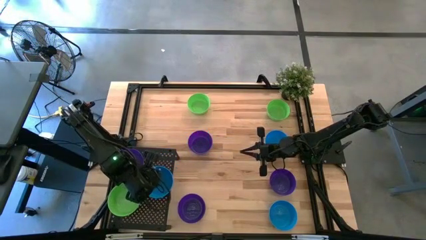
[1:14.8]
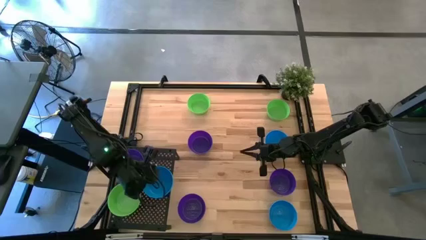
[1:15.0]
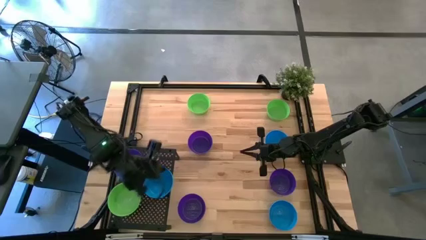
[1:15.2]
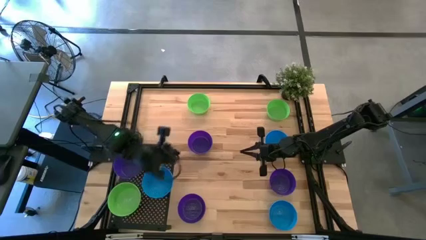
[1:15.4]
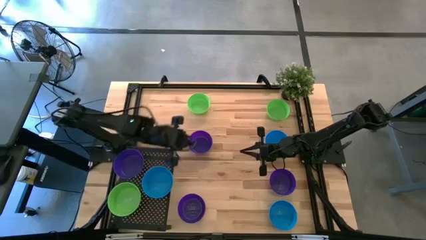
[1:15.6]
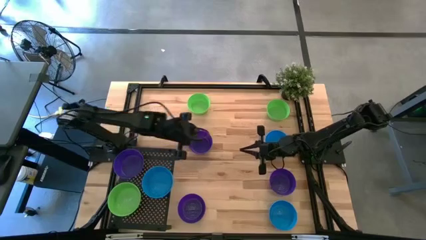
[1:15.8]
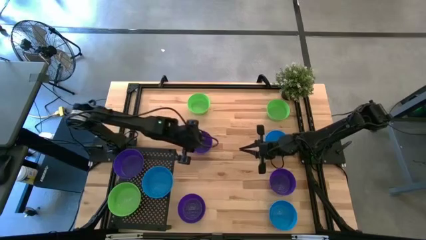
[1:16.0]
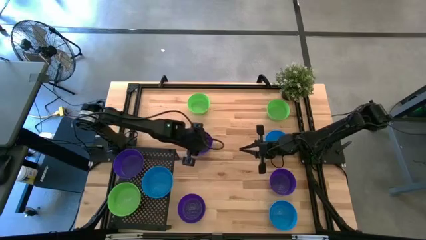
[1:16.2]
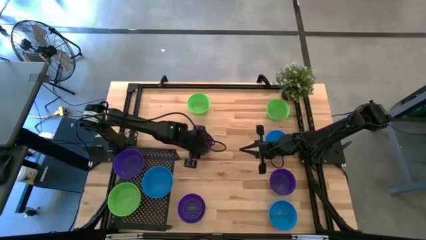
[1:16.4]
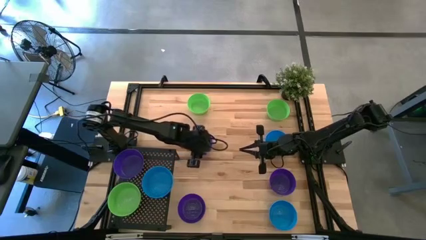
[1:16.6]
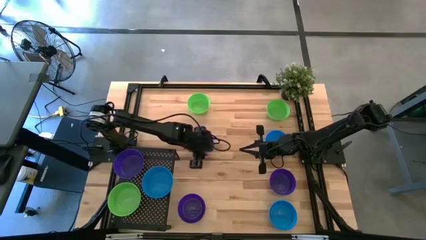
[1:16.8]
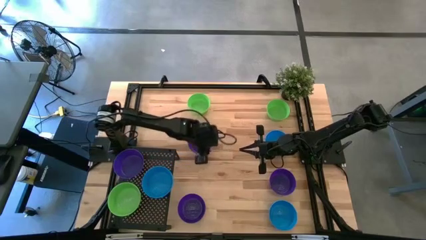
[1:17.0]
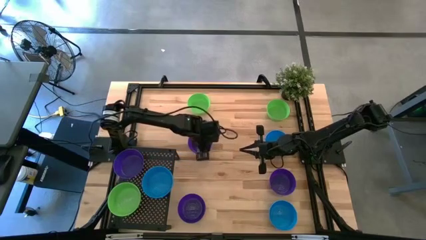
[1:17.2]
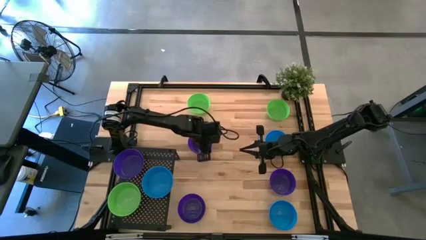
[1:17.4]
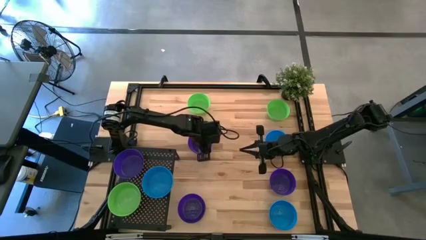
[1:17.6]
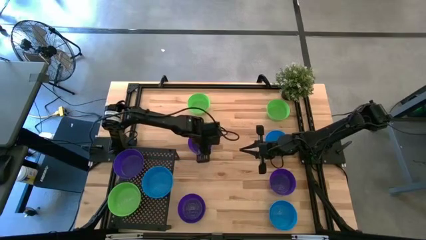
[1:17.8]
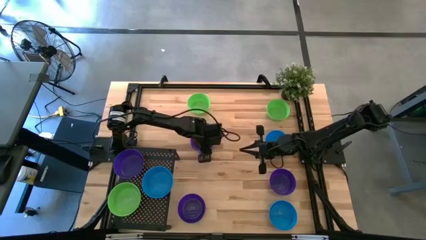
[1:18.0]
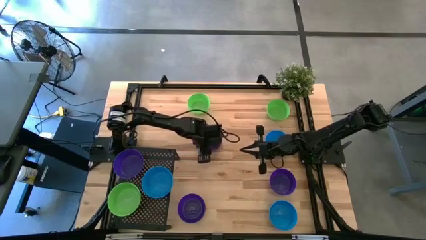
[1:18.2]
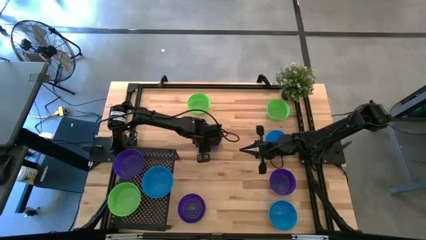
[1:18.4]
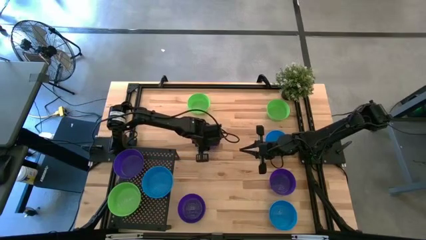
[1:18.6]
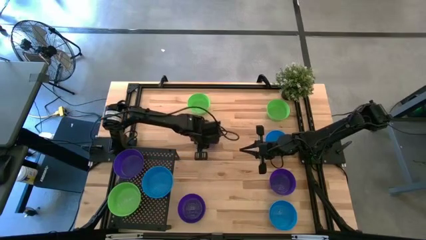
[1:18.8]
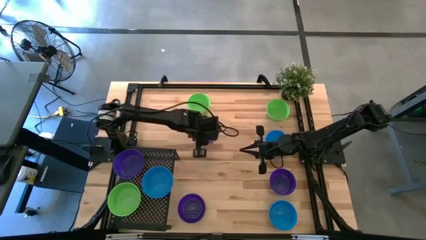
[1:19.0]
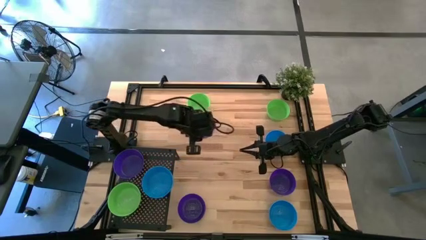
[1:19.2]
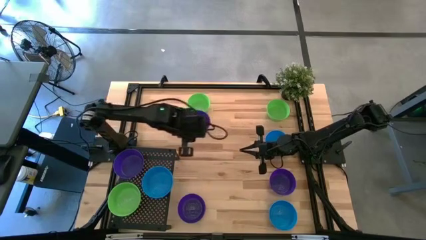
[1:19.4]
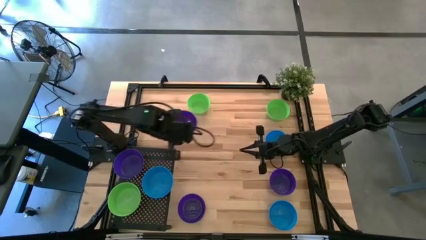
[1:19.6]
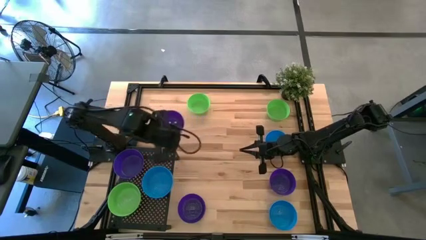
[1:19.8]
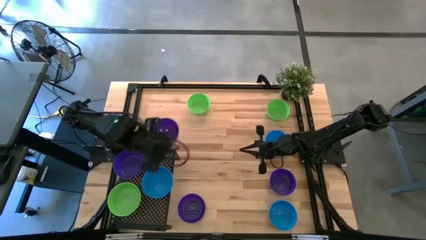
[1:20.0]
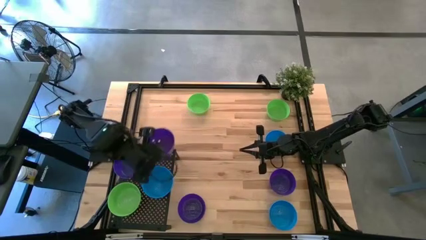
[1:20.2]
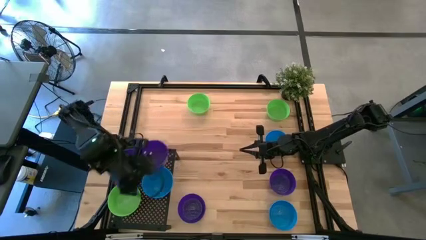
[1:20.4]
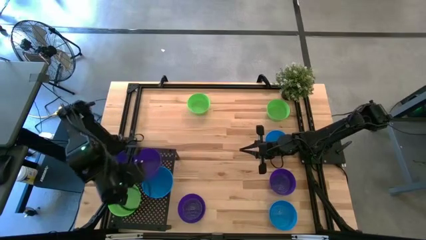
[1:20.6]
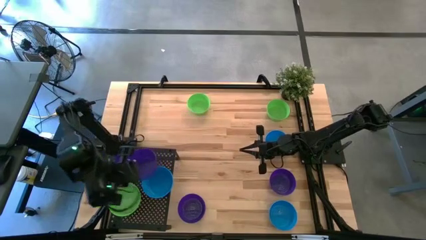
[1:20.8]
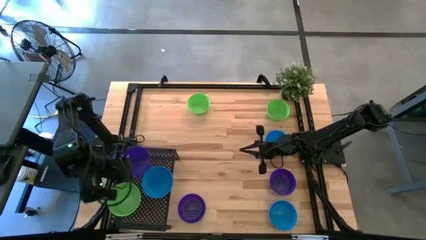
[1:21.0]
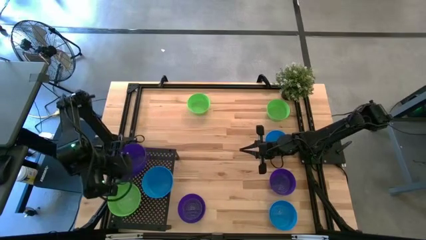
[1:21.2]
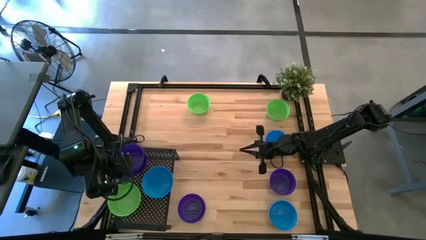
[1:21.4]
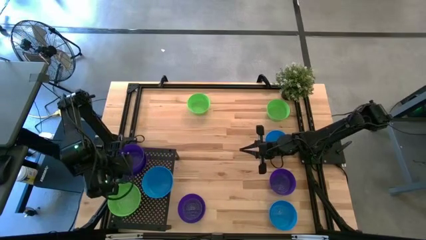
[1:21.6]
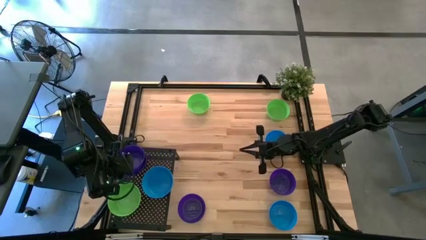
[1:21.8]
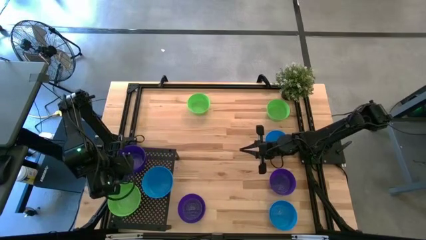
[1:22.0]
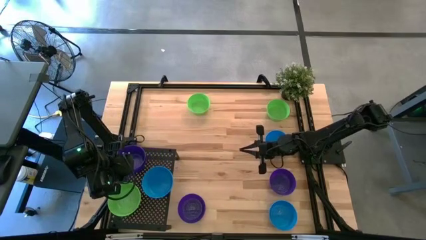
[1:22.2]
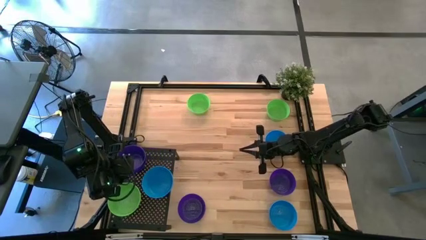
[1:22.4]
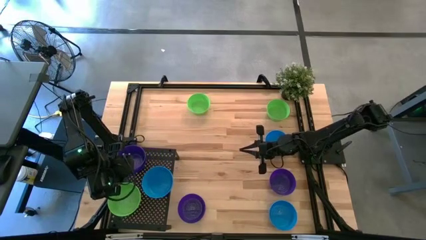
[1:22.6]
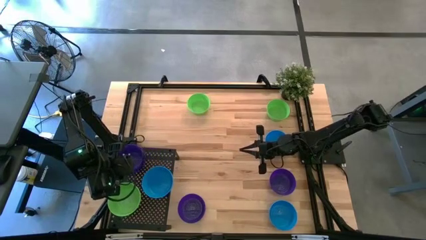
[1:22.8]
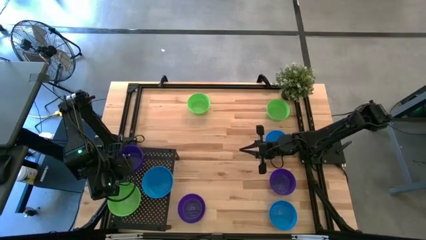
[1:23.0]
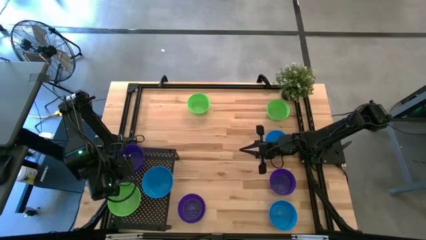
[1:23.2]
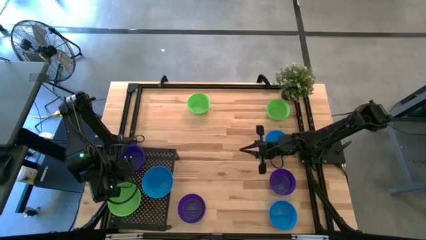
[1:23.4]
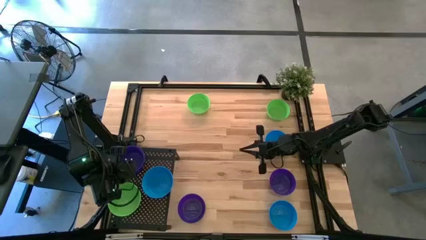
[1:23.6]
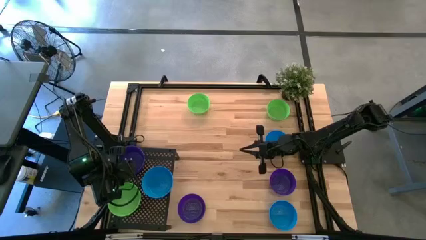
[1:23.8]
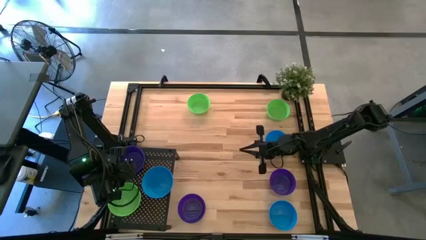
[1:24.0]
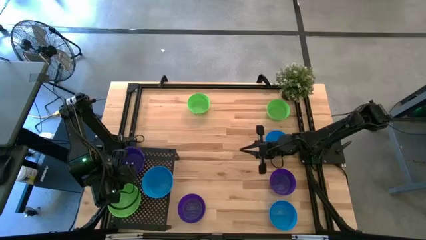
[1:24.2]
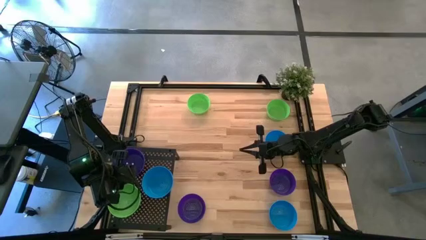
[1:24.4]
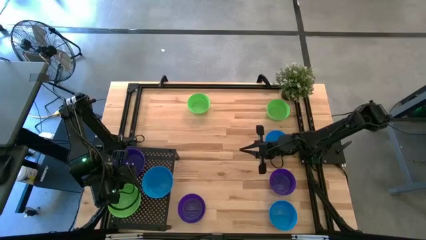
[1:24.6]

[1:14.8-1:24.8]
Task: Pick & Place Mini bowls
Stack the violet bowl on the other violet bowl on the shelf

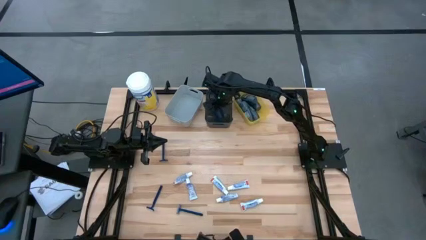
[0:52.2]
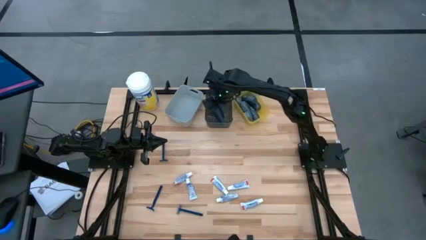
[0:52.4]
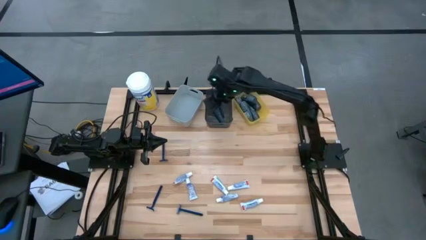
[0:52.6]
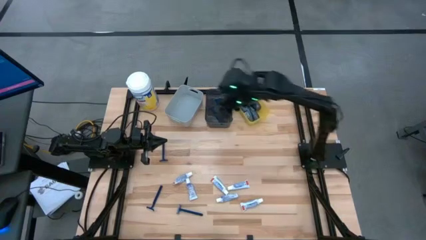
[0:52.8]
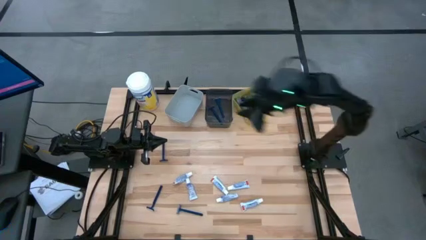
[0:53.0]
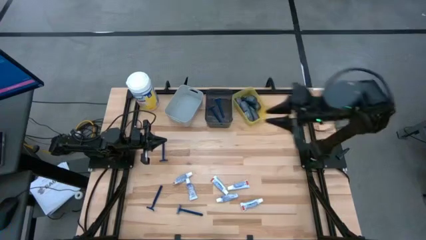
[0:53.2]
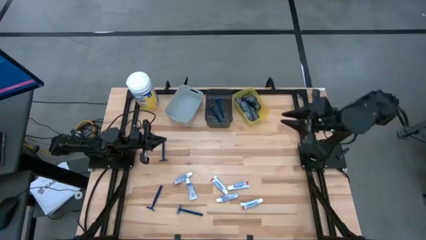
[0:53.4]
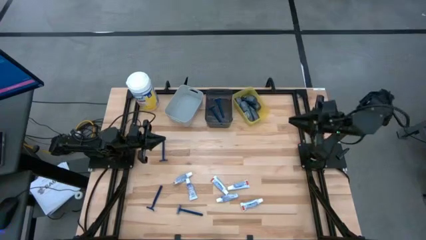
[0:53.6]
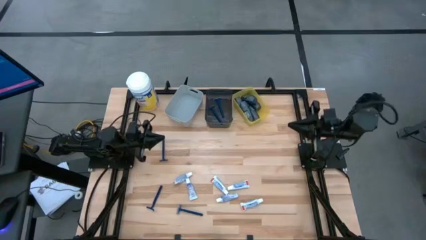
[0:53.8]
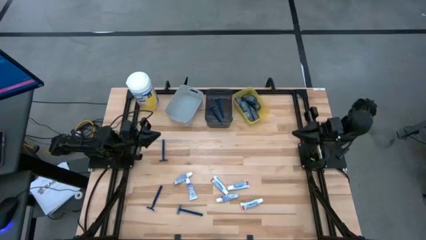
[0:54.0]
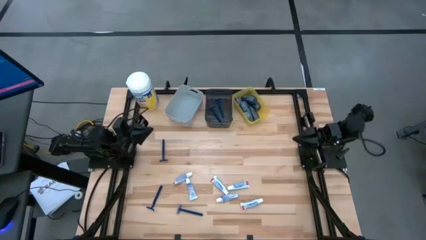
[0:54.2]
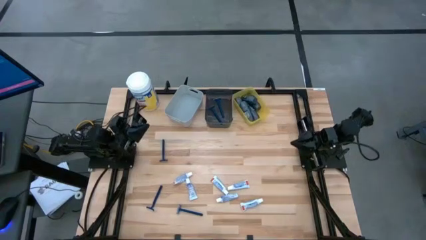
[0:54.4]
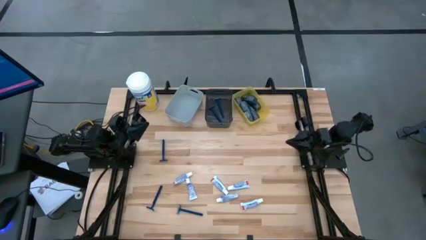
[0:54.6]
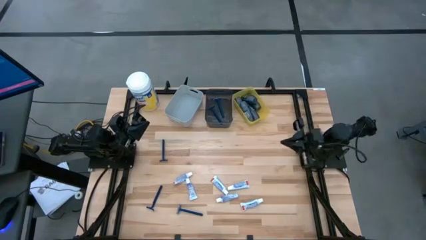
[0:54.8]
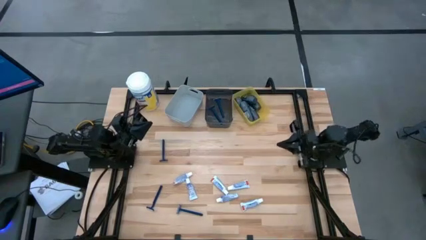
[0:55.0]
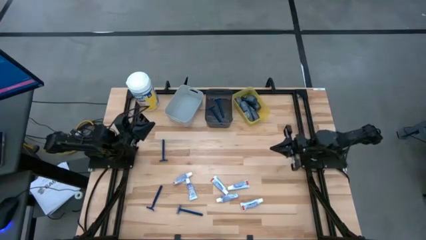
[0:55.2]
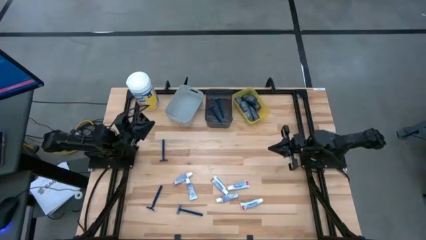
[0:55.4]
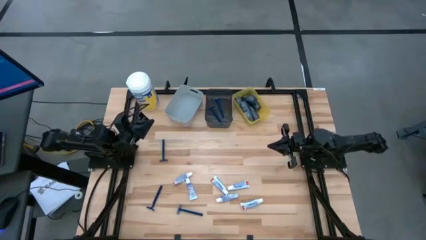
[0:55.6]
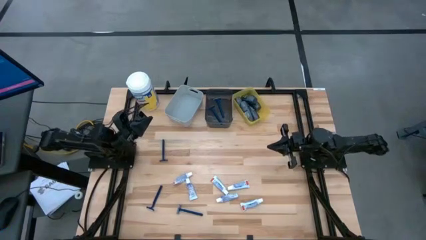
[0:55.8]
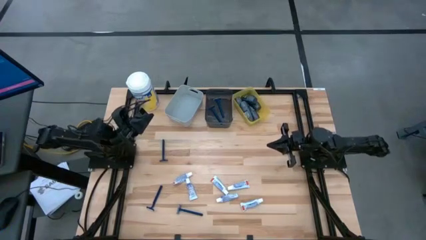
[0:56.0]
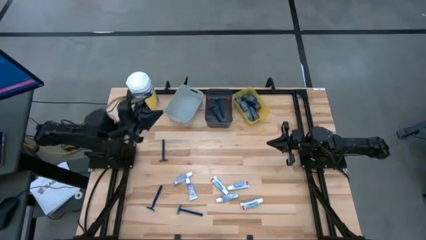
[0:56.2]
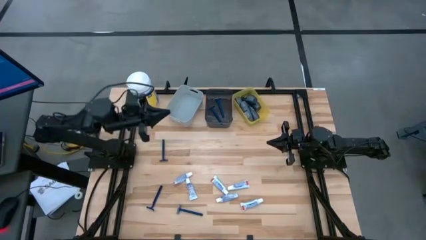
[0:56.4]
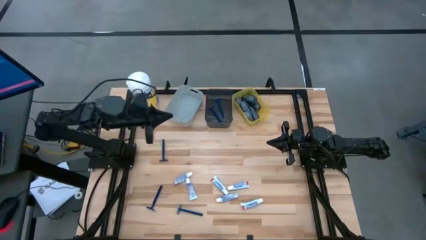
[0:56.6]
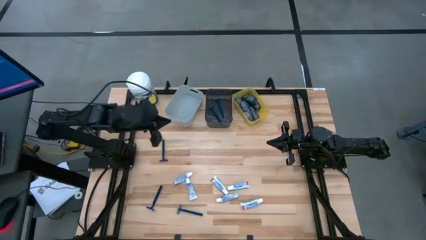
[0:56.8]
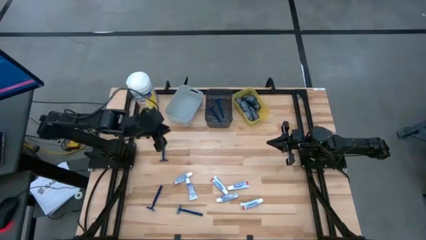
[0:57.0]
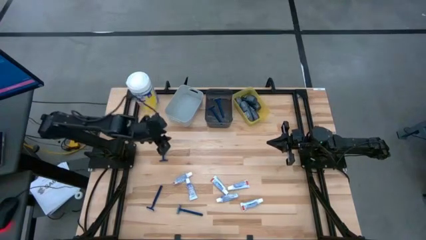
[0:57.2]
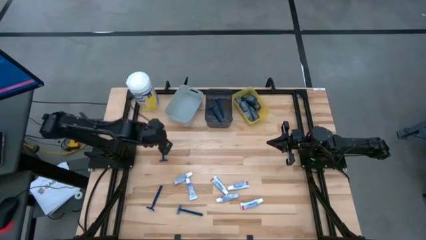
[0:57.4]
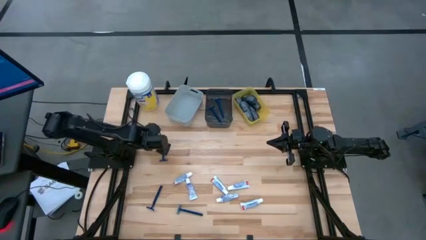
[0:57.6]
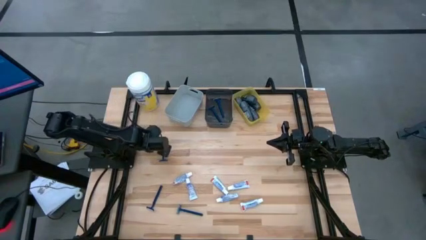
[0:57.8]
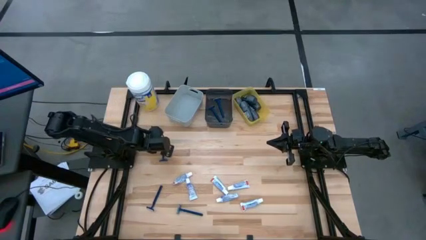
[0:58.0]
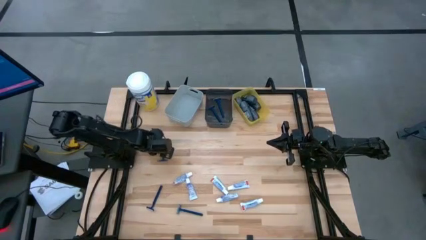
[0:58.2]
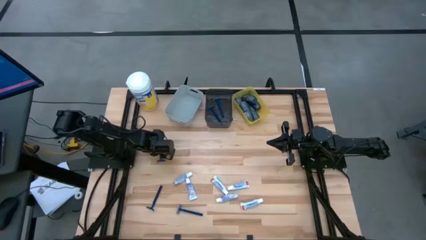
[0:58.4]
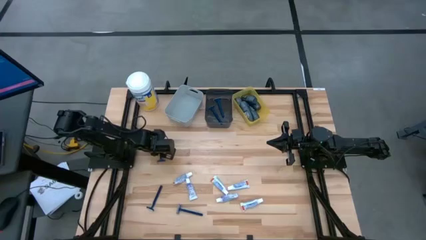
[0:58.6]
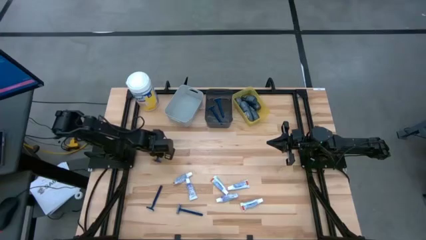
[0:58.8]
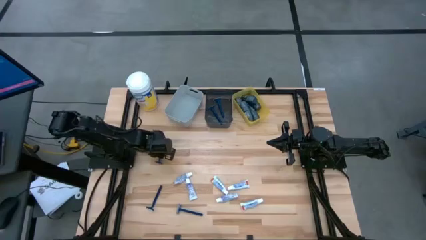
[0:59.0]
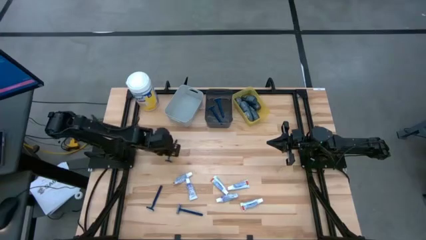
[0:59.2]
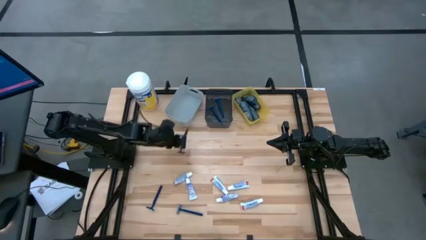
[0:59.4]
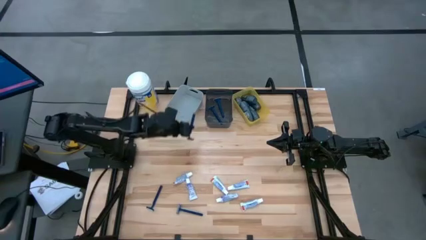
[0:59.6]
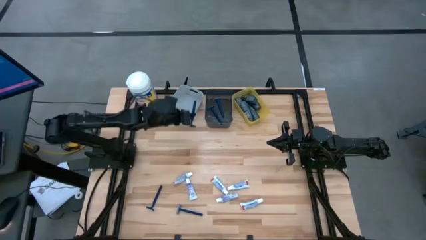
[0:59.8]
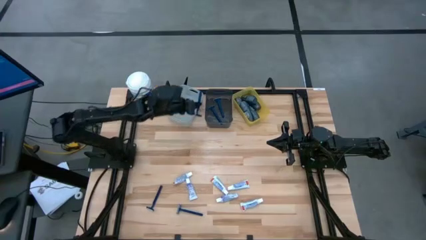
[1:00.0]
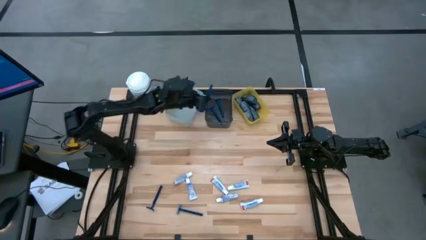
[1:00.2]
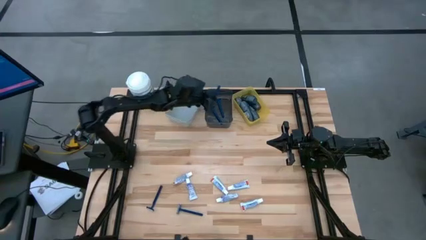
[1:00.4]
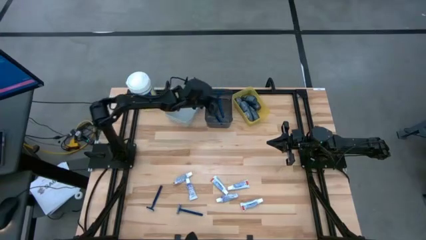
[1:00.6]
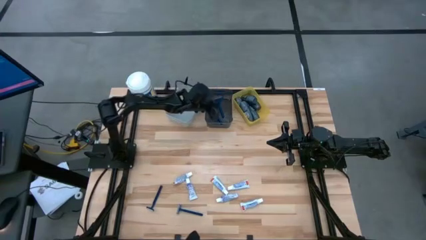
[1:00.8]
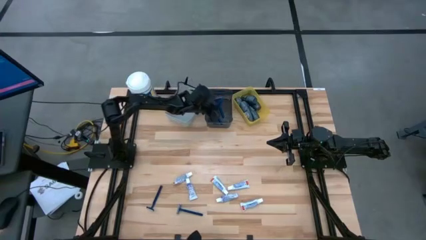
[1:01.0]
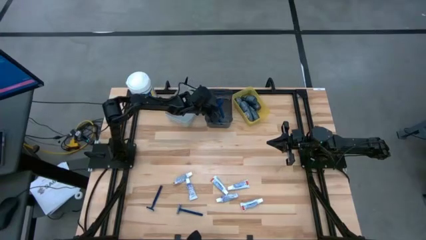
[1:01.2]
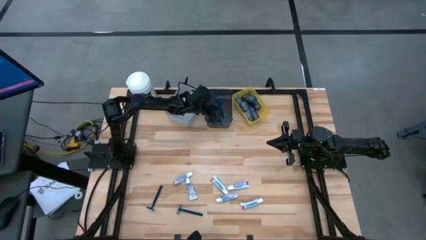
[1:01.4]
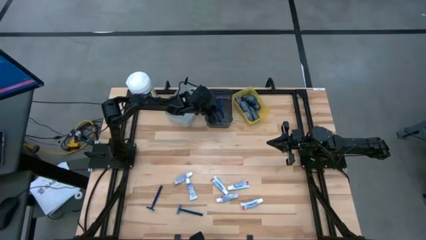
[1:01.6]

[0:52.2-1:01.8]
Task: Pick & Place Travel size toiletries
Put the razor into the black bin
